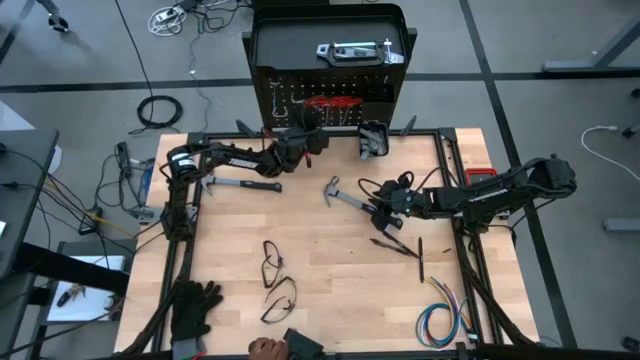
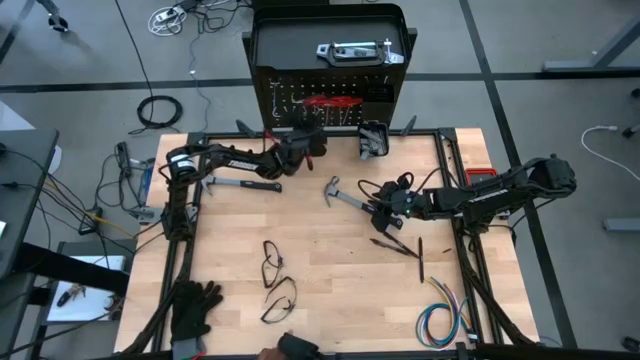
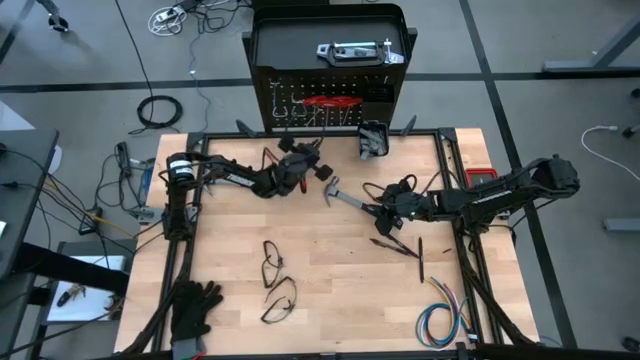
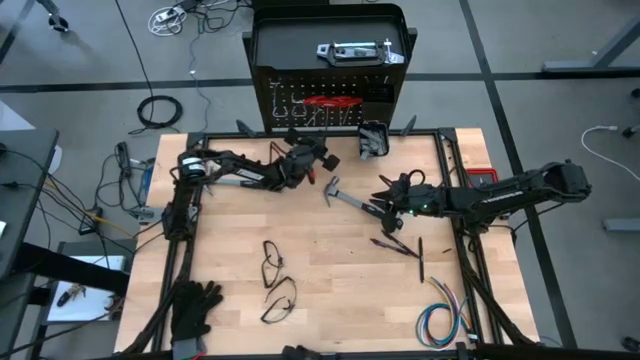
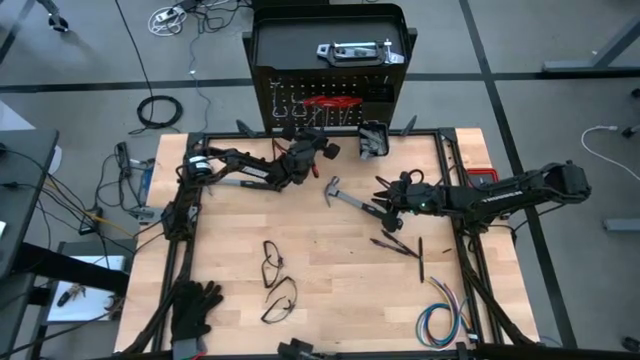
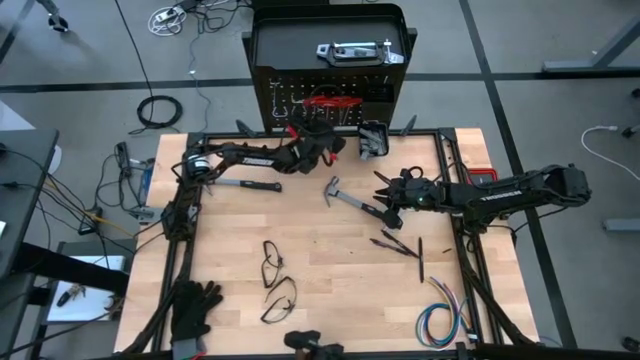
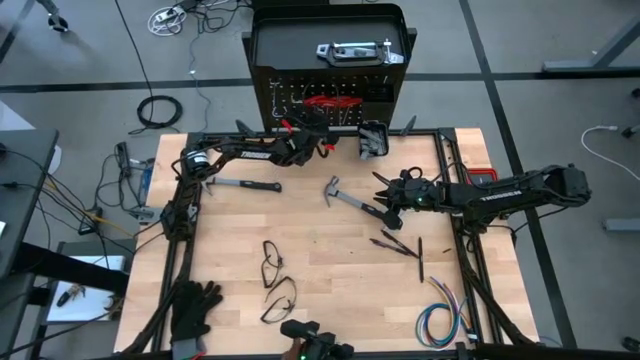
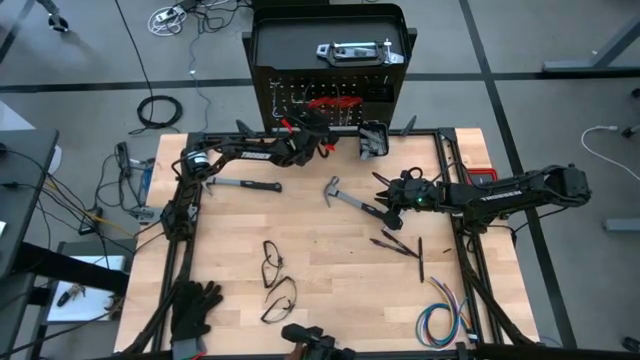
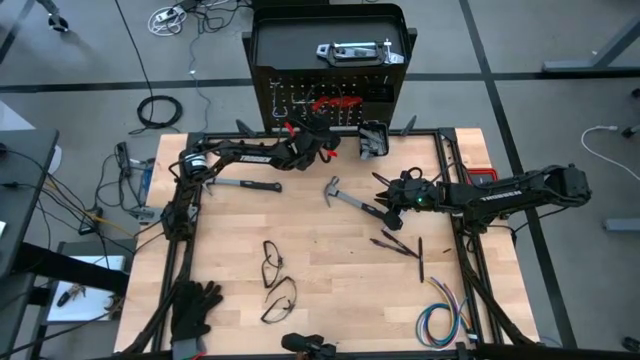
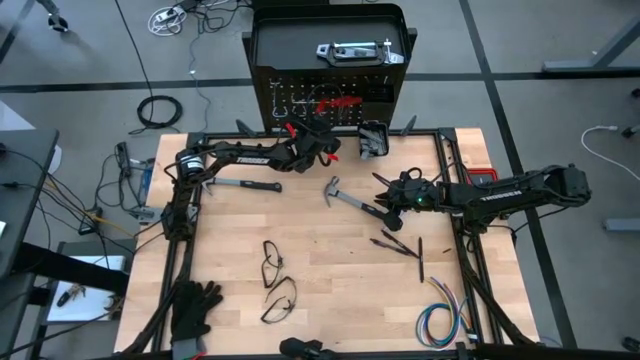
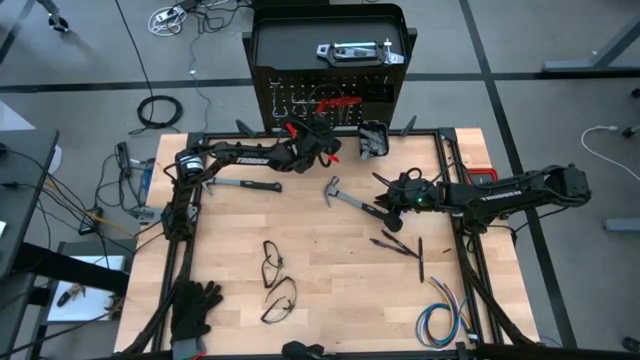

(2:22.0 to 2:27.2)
Task: Hang tools onto peg board
Remove the bottom hook

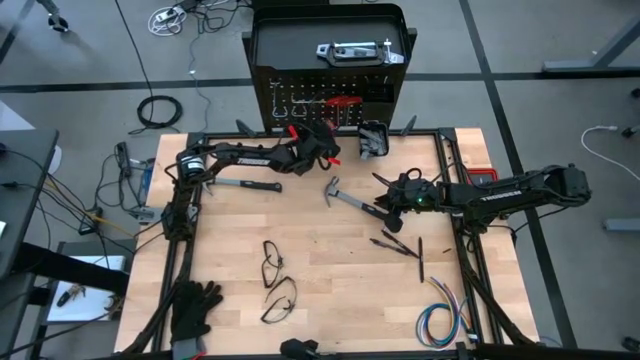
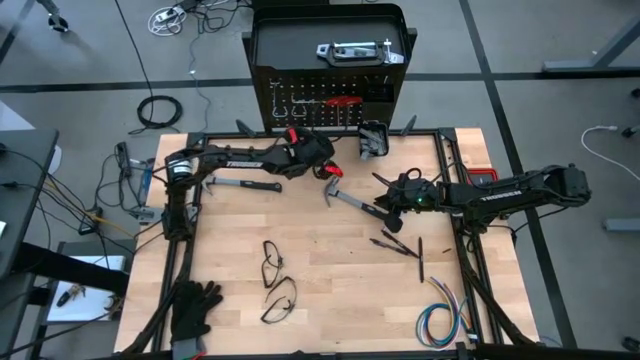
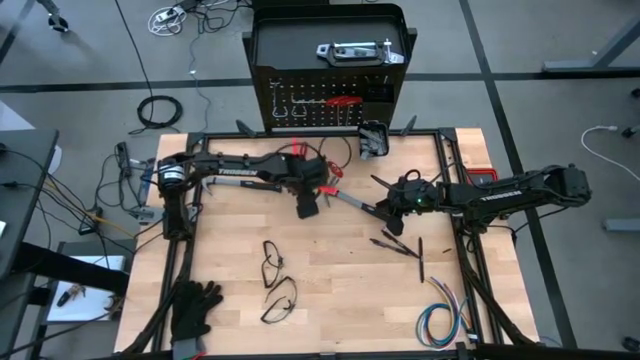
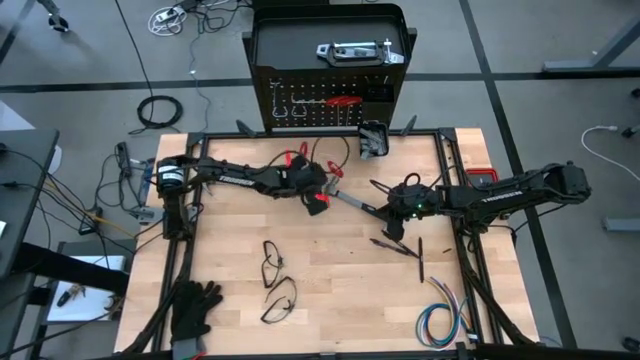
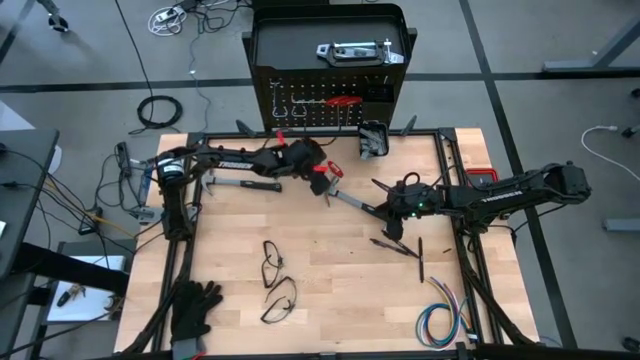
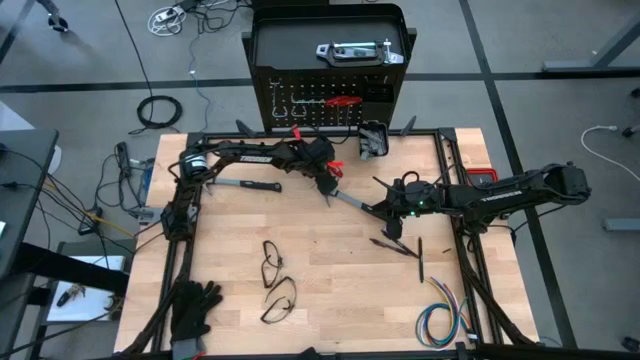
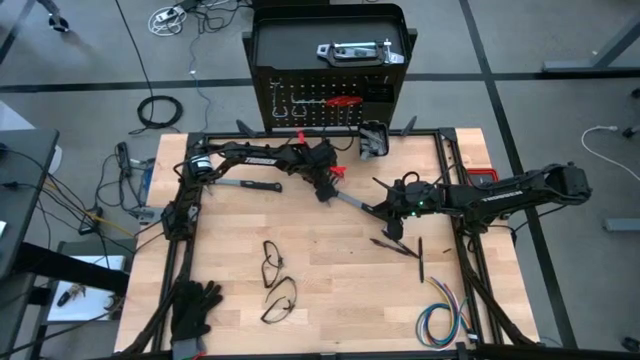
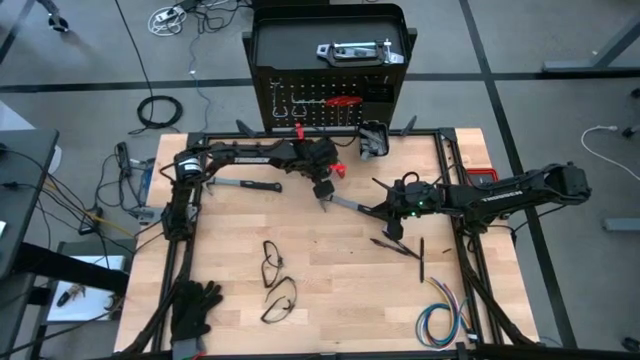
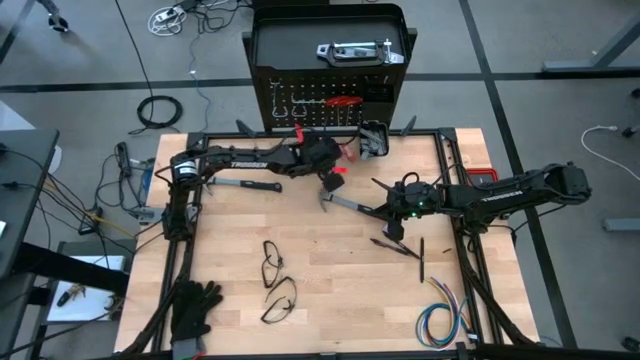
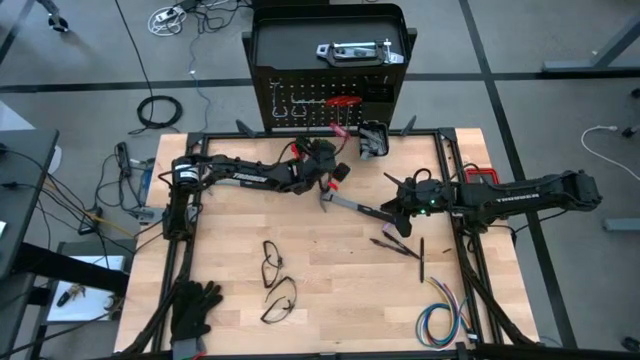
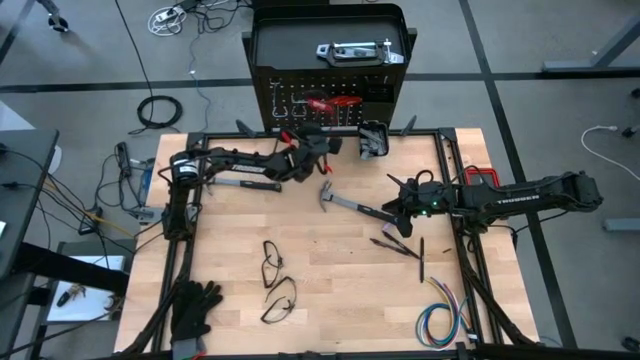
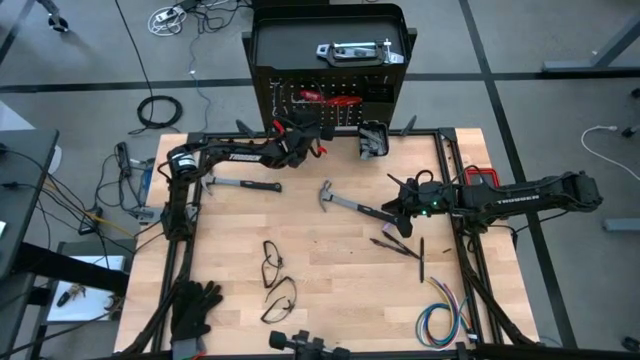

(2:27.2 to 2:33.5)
Hang the right T-shaped metric hex key on the pegboard

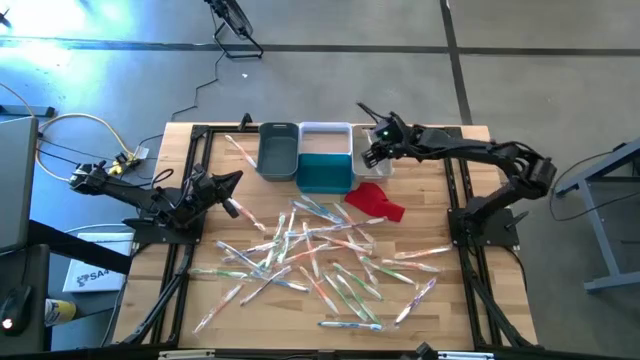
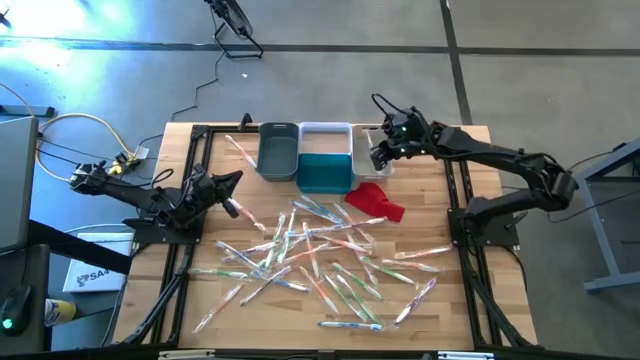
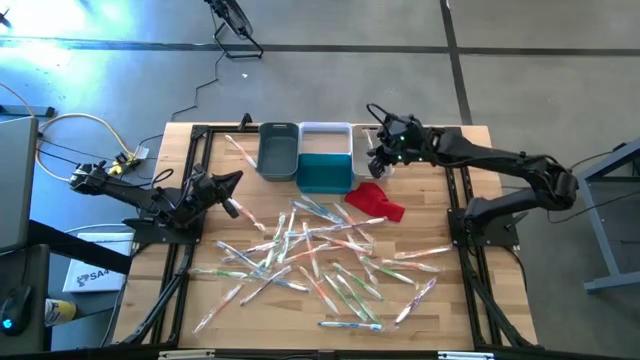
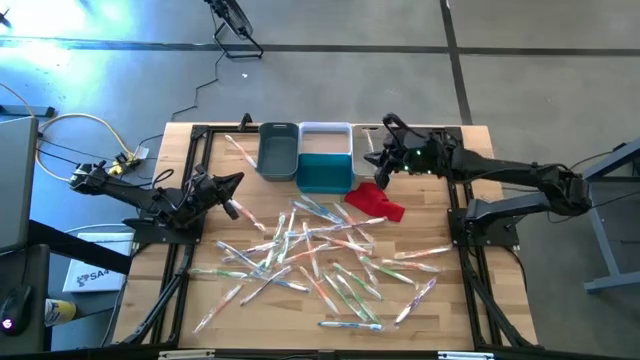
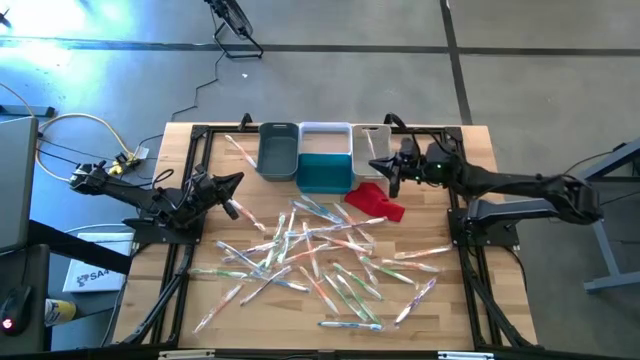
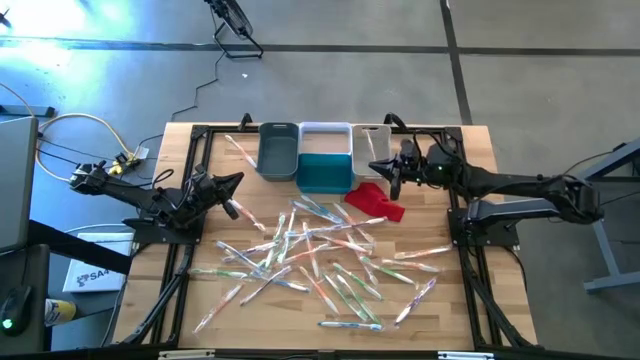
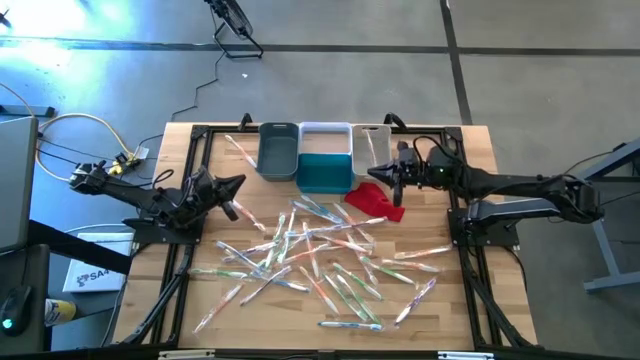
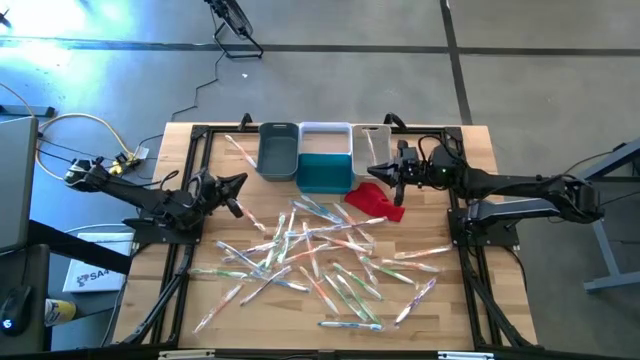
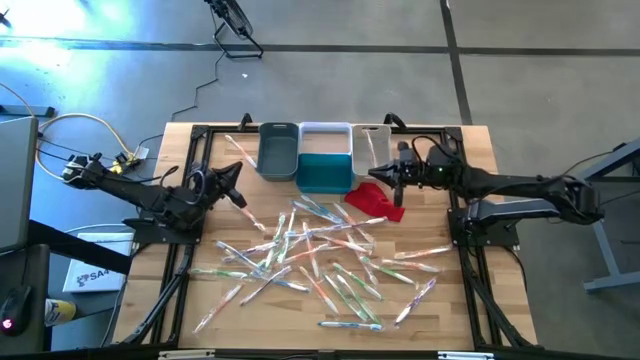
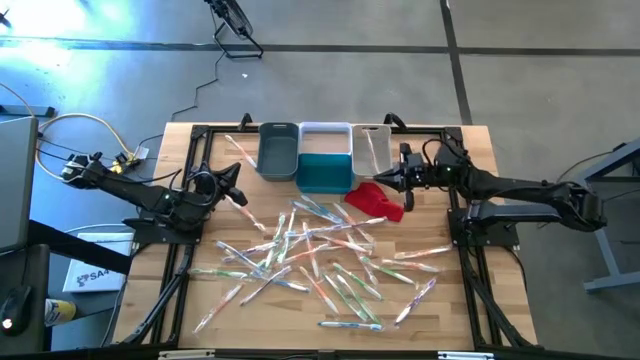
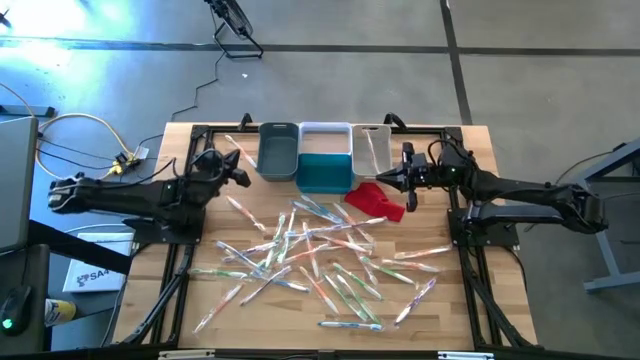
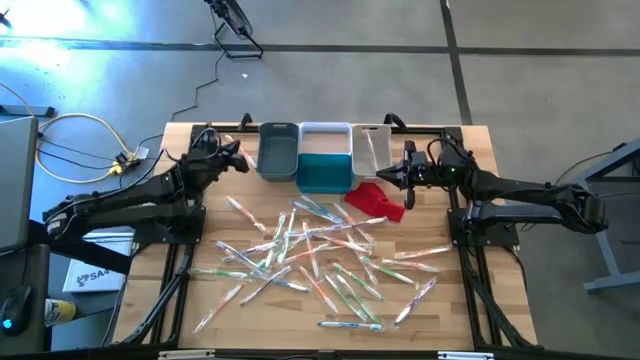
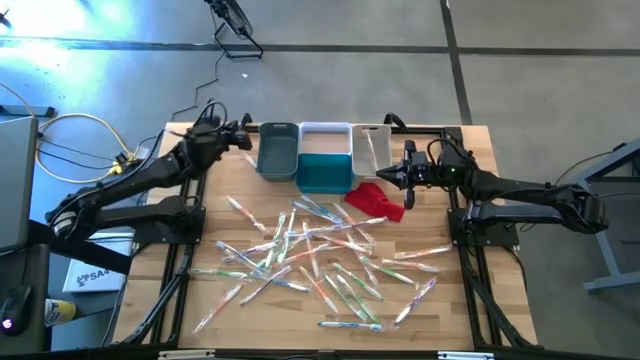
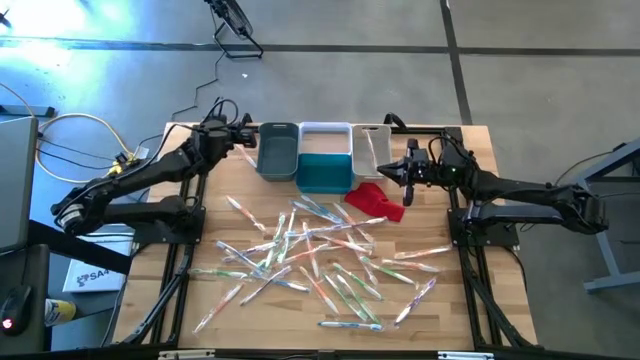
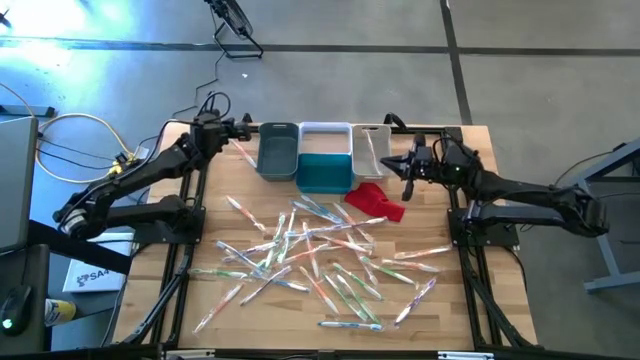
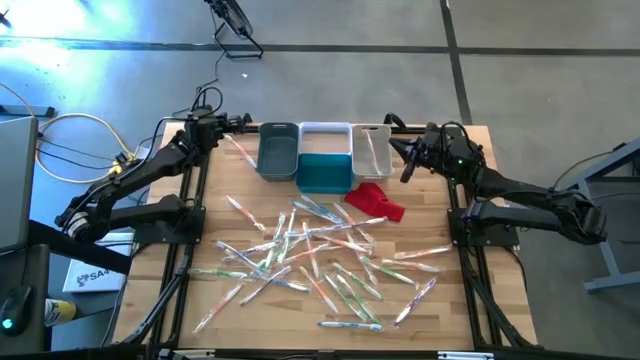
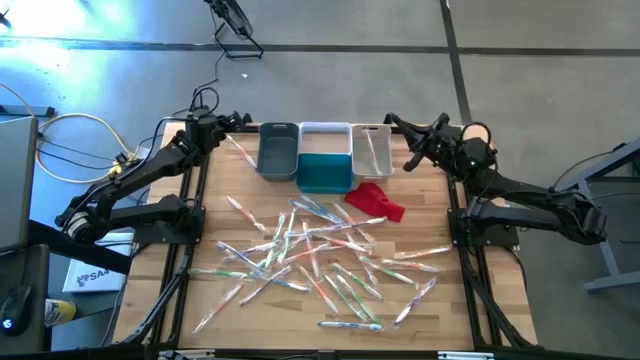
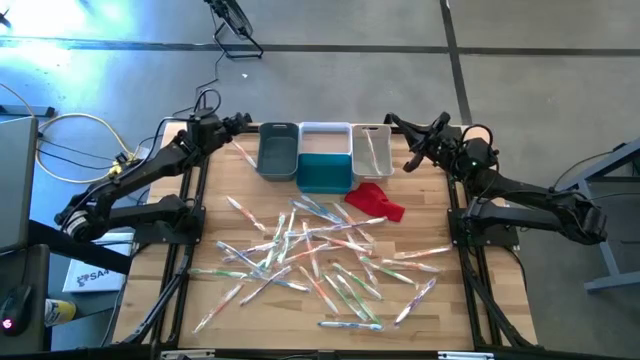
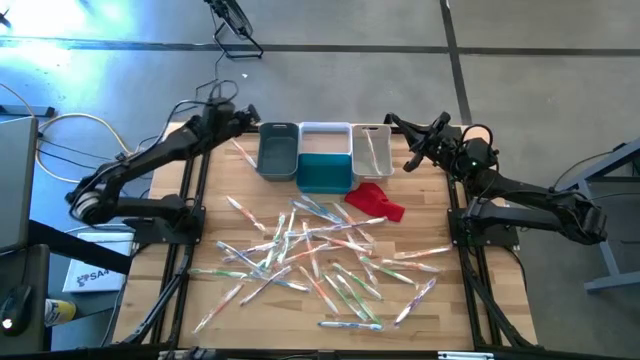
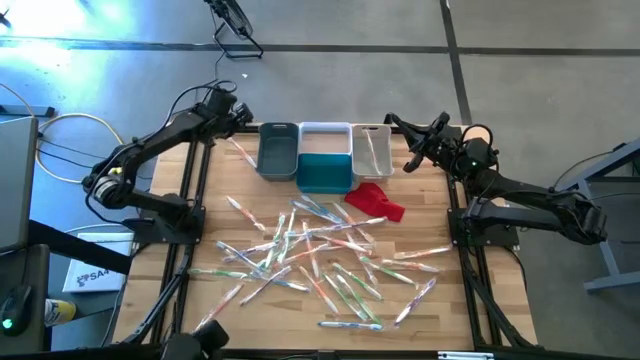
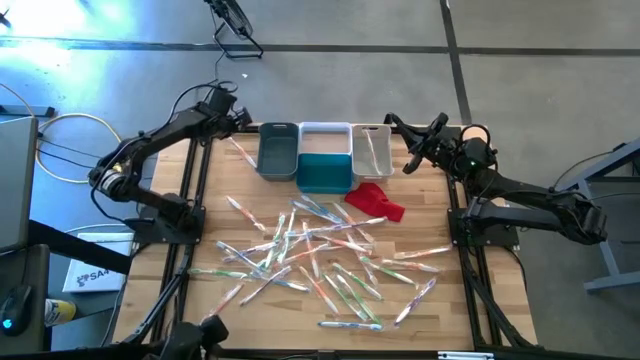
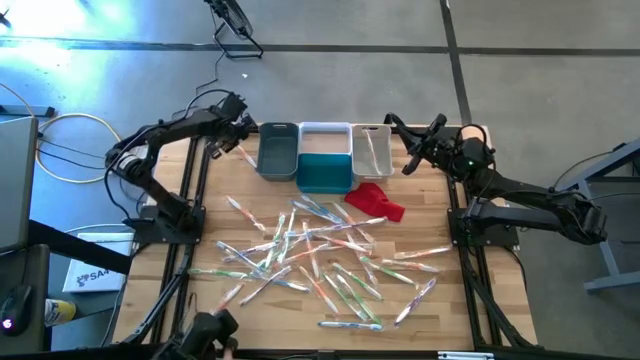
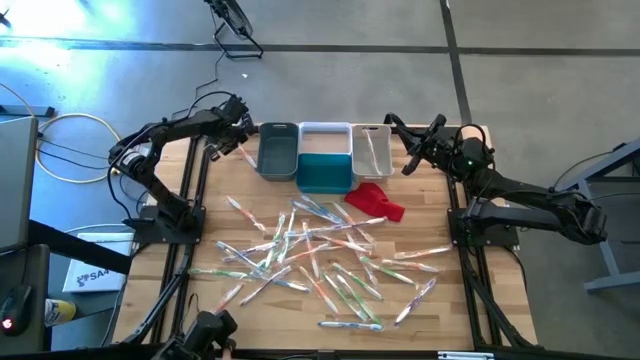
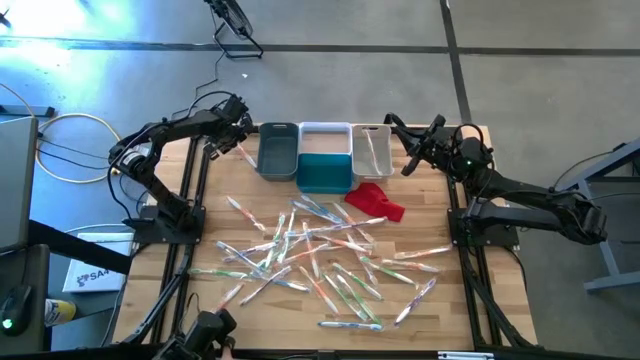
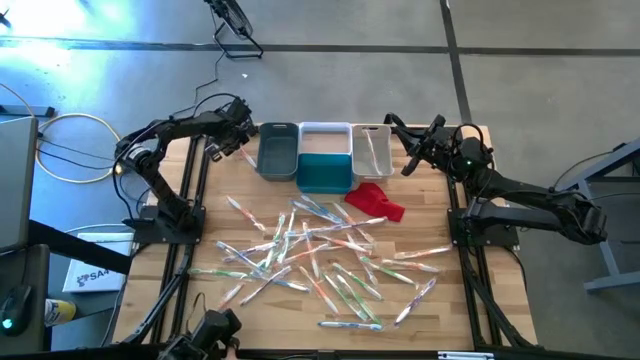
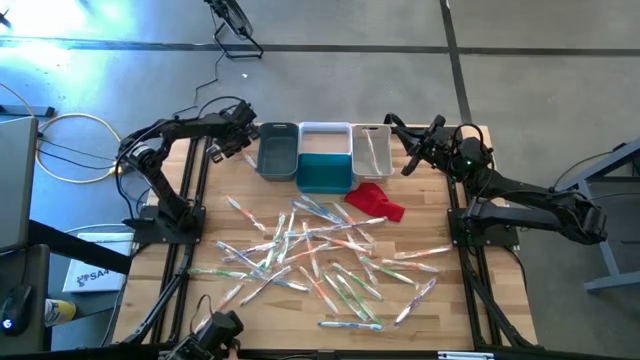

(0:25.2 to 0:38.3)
Task: Pick & Place Toothbrushes
Put the orange toothbrush into the white bin
